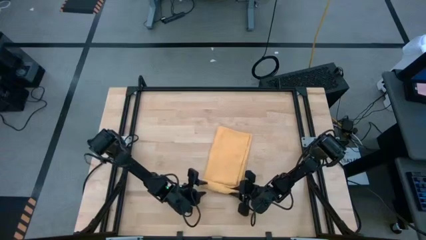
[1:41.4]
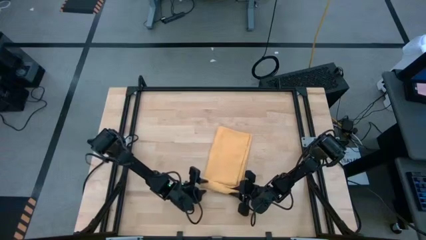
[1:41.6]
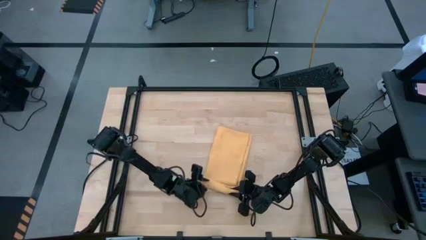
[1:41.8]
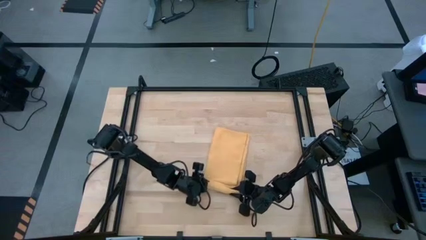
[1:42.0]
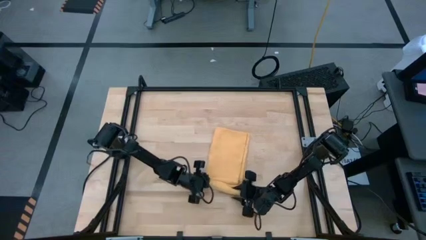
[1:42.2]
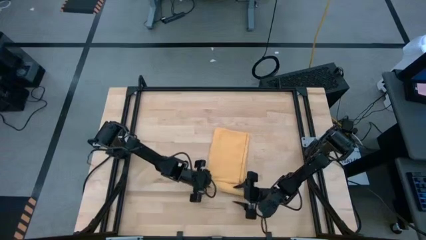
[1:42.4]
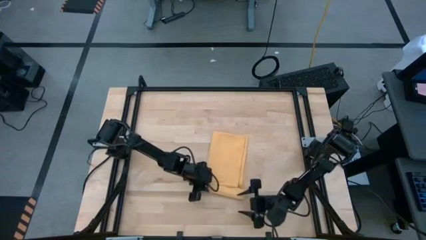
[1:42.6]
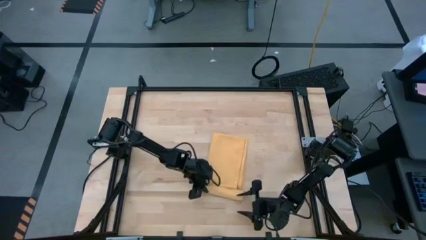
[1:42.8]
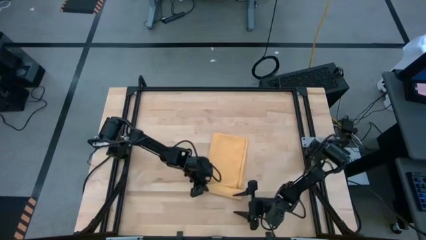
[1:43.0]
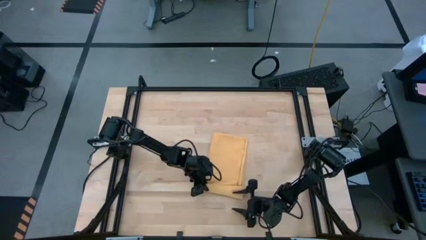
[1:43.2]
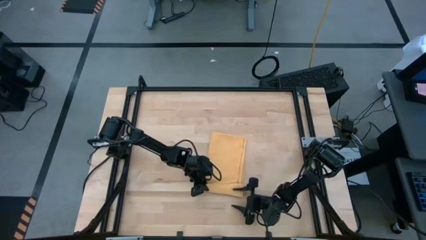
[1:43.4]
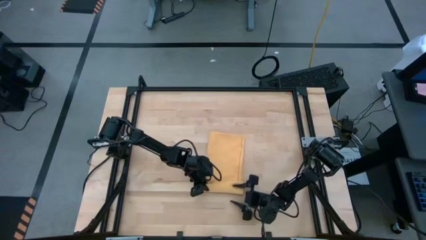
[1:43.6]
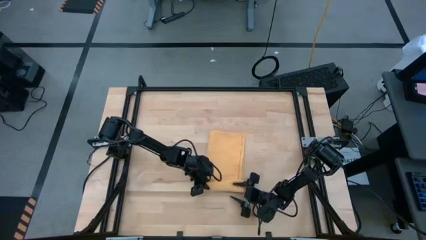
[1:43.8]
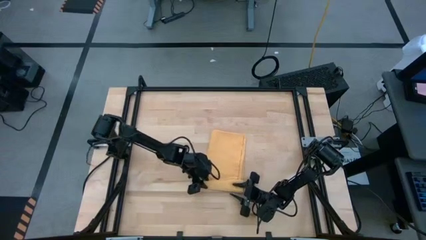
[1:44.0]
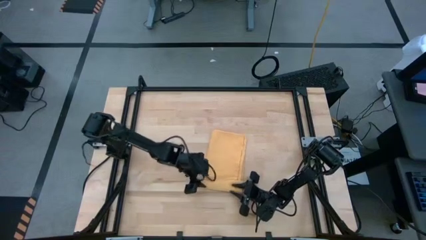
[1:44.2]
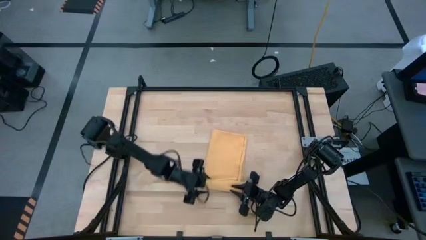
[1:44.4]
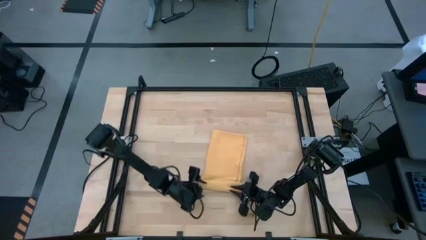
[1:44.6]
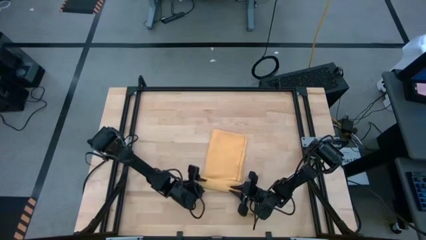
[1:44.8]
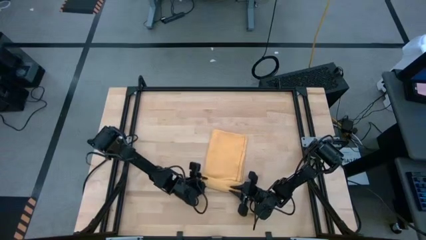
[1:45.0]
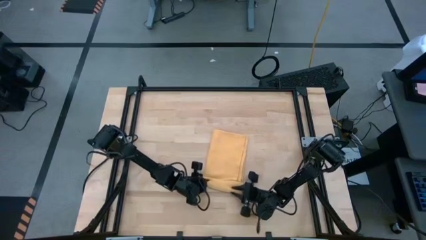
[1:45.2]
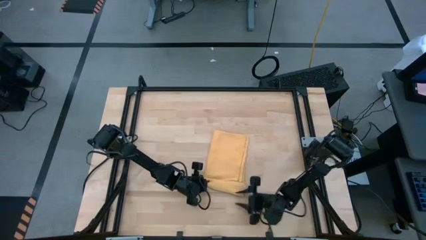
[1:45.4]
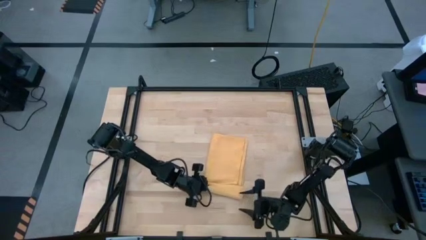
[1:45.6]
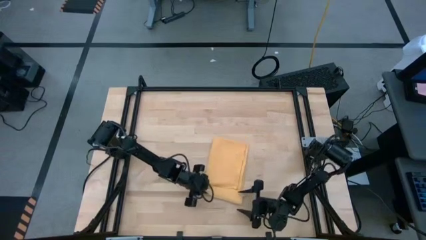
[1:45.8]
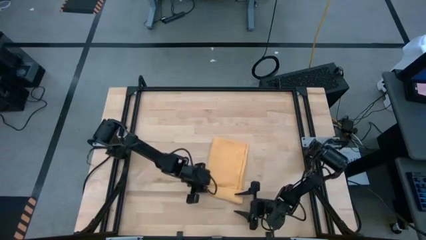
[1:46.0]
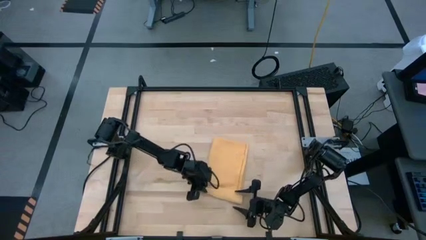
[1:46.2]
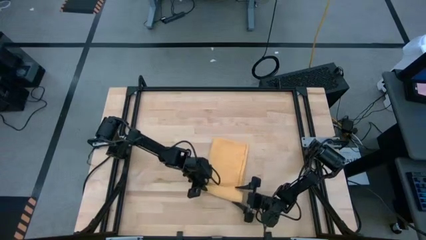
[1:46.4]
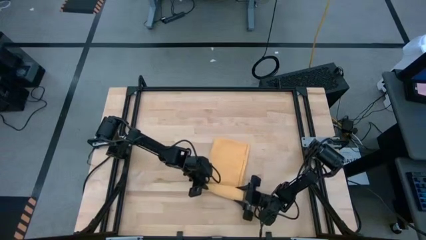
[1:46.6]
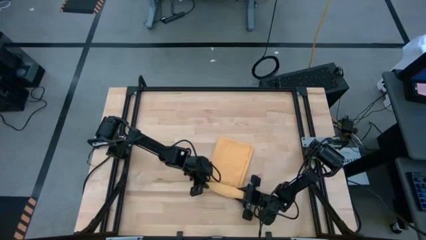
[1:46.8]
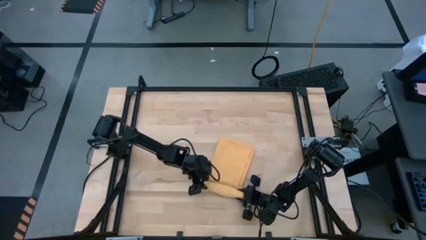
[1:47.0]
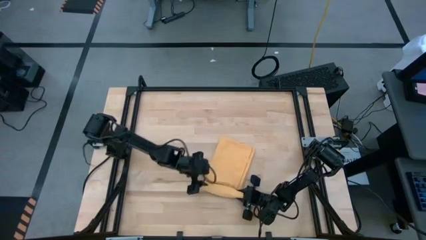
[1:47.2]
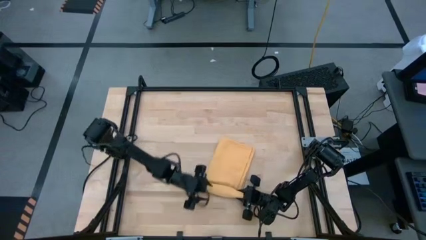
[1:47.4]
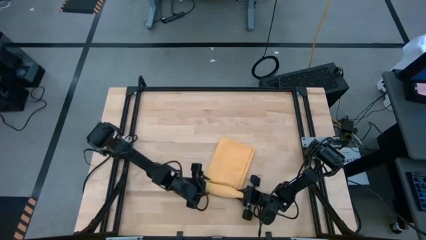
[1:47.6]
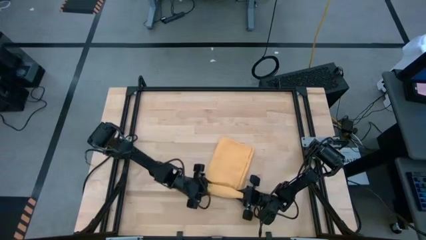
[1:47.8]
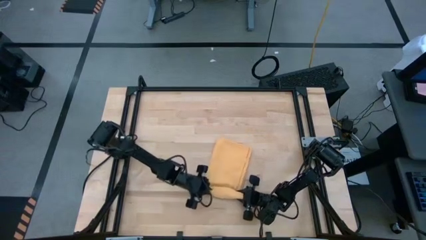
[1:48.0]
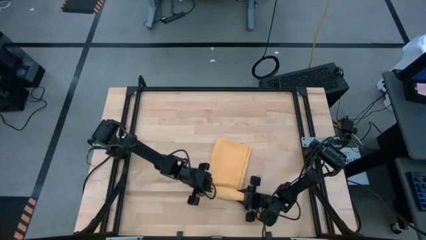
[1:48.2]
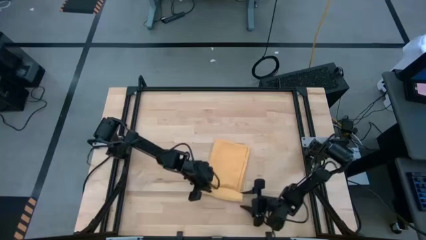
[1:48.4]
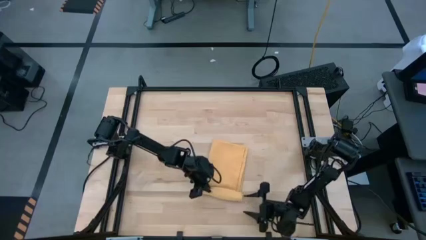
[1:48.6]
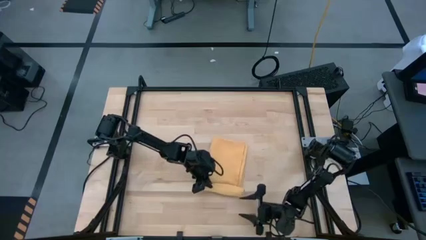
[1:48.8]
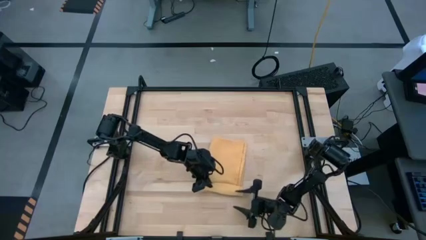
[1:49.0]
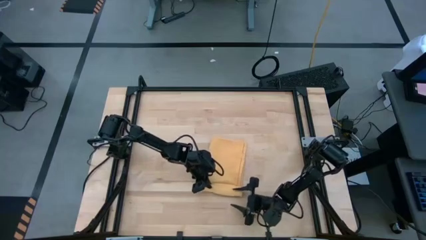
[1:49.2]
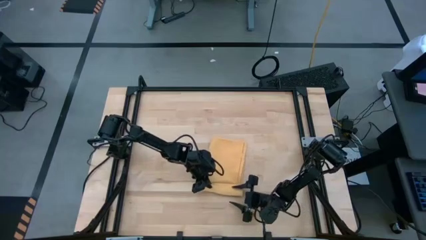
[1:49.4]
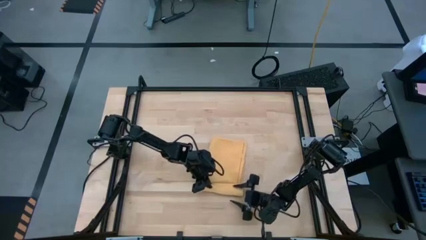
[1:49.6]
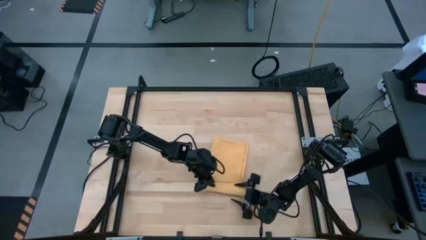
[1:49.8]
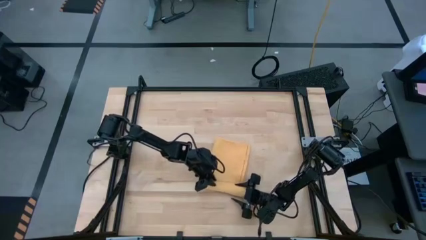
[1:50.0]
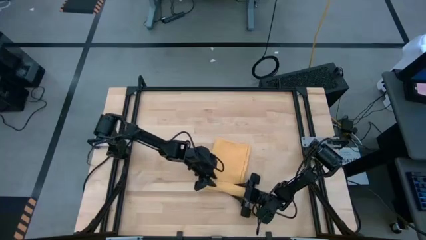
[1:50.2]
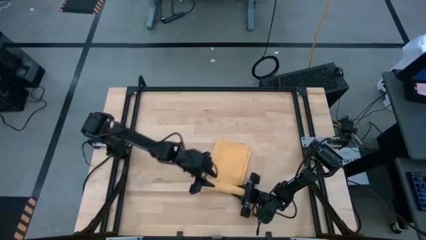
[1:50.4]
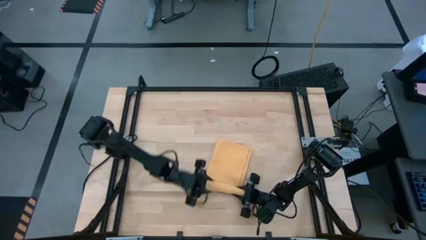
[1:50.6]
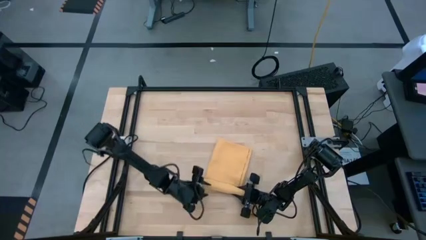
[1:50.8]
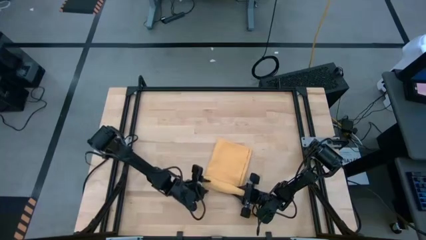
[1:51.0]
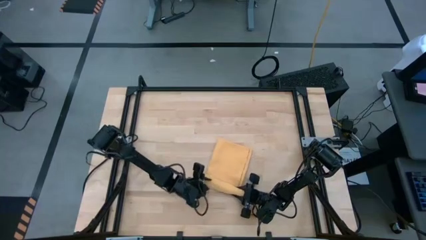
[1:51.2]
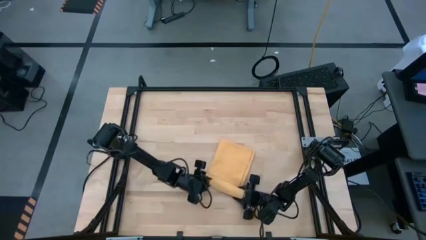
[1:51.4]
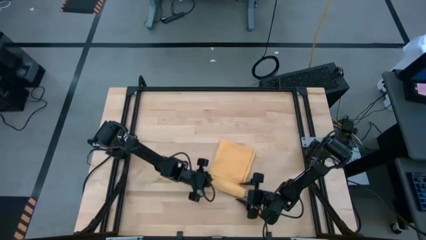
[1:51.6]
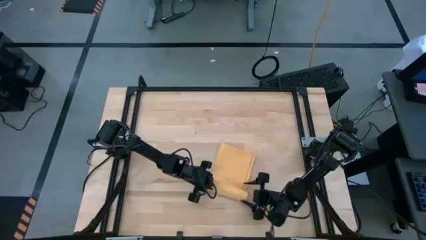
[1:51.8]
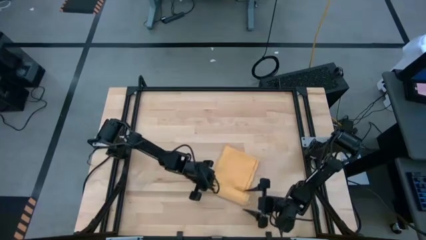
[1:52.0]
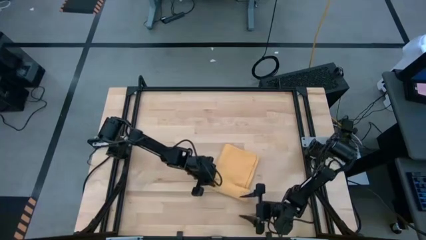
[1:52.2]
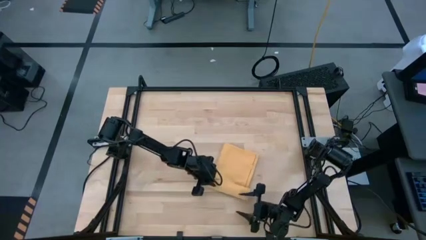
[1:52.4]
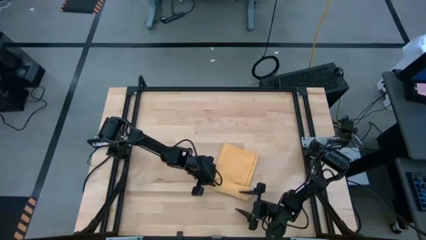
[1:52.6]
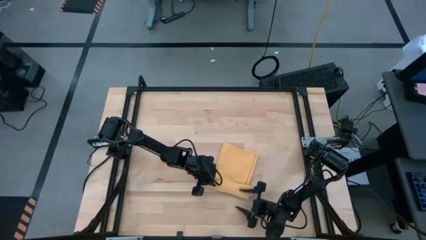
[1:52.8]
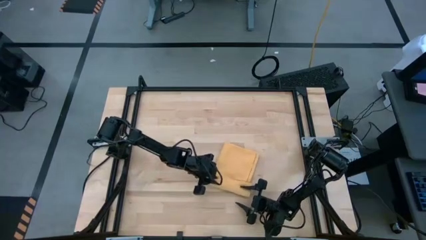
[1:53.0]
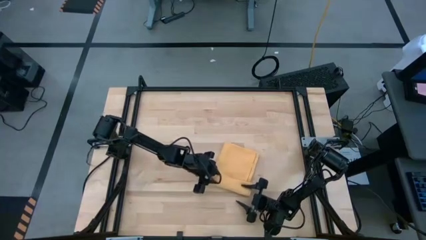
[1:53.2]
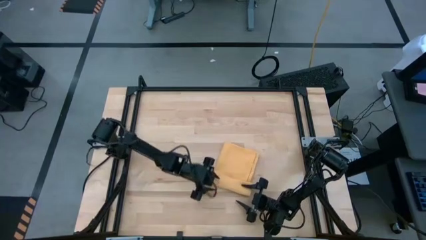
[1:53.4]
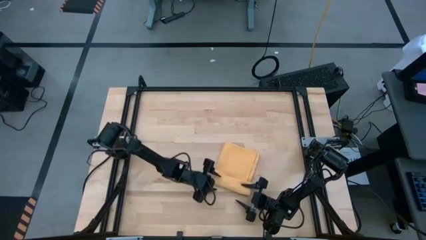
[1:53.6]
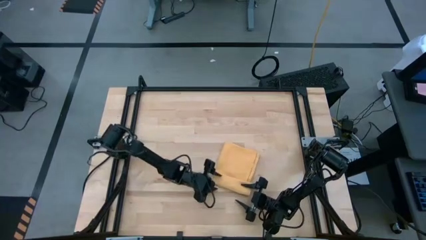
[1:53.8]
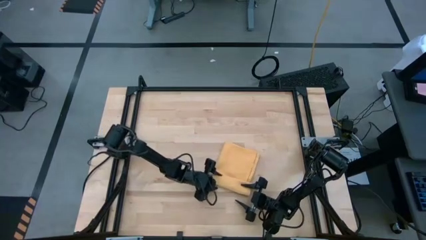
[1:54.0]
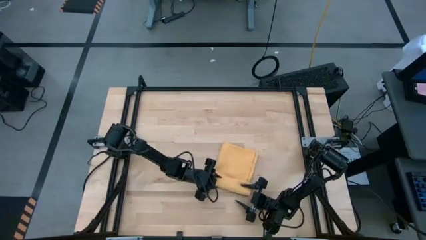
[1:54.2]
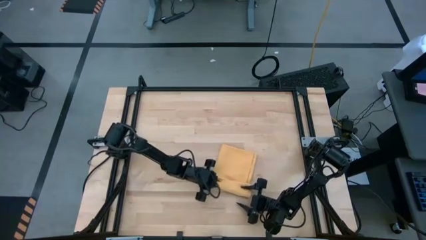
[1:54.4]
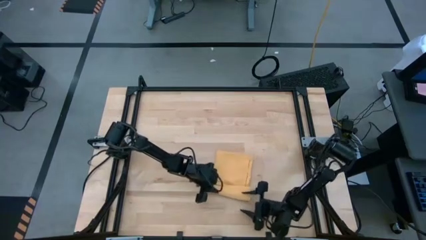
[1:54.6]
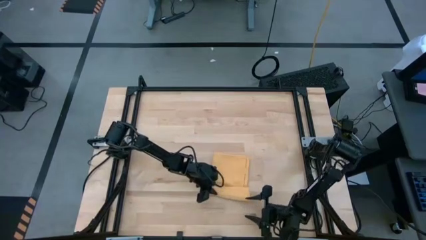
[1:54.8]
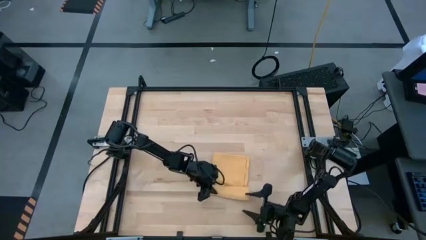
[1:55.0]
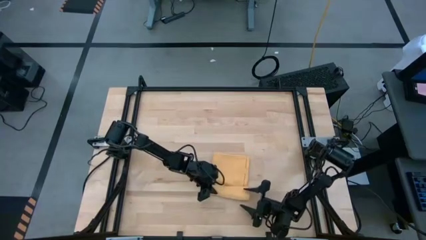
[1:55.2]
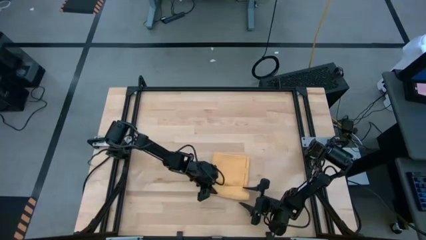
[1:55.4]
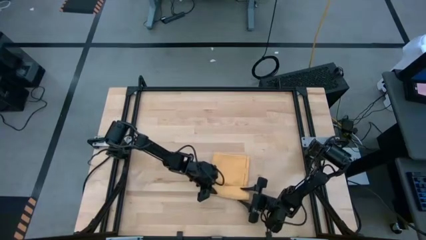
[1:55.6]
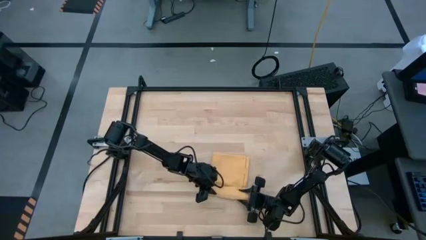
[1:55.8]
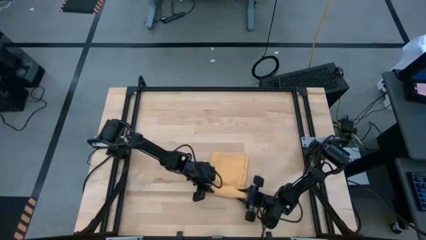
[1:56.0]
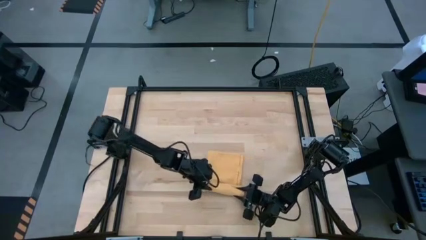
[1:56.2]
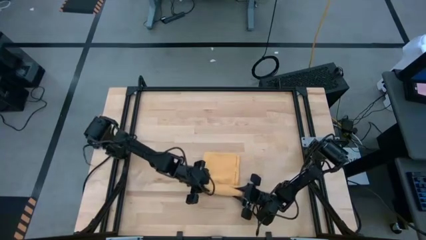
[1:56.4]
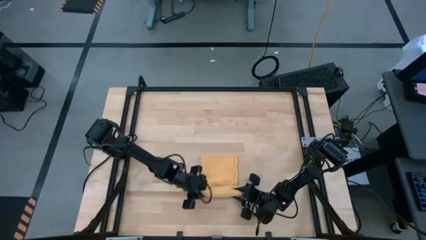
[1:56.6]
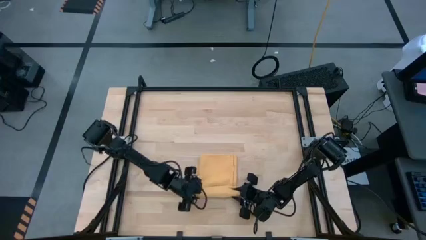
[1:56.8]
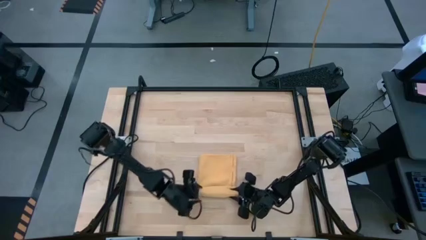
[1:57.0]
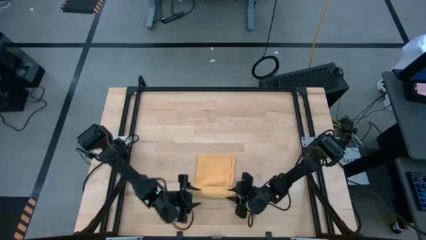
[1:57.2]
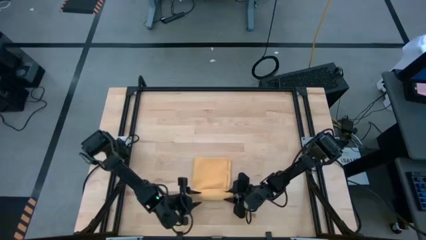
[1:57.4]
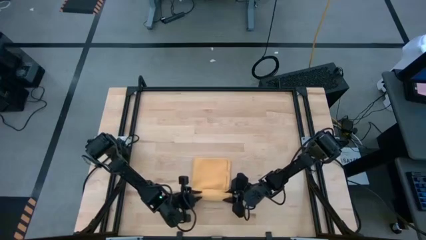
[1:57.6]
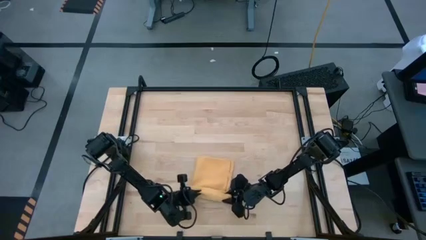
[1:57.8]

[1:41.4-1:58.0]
Task: Roll towel
Roll the yellow towel
